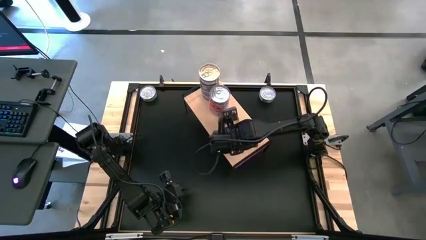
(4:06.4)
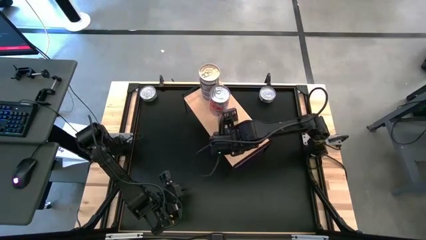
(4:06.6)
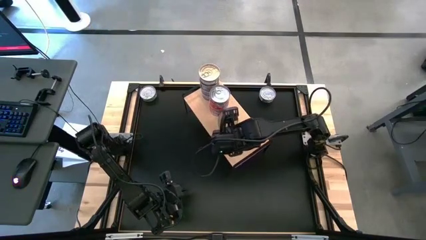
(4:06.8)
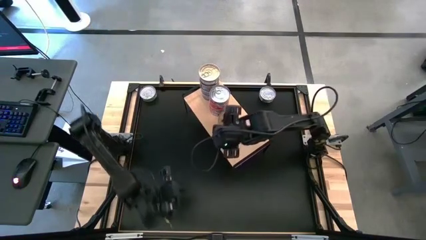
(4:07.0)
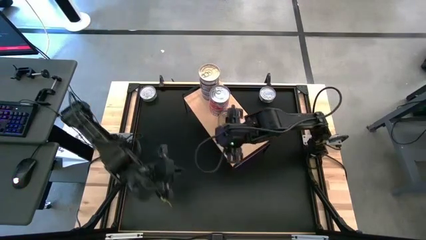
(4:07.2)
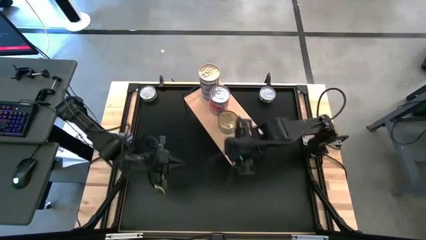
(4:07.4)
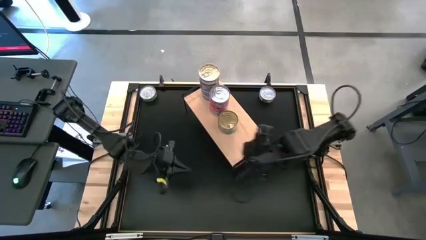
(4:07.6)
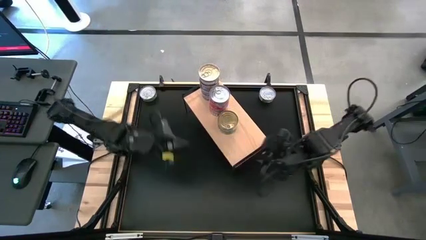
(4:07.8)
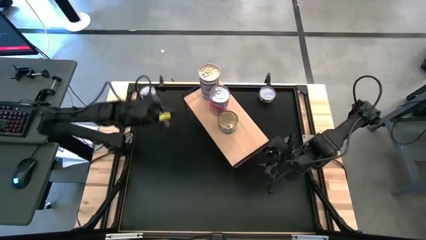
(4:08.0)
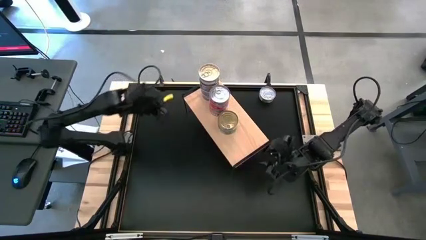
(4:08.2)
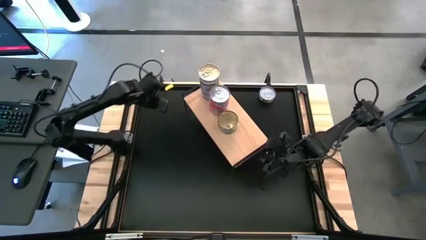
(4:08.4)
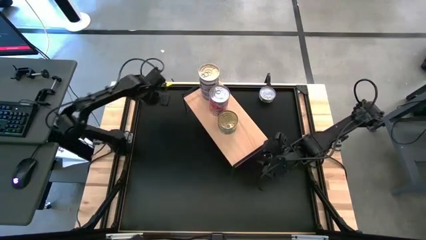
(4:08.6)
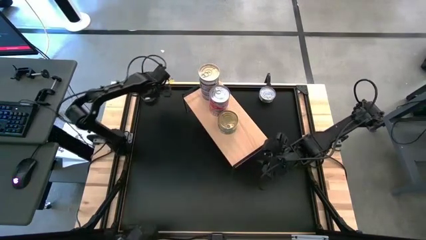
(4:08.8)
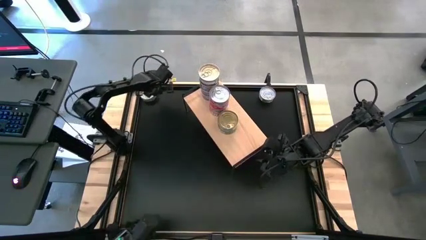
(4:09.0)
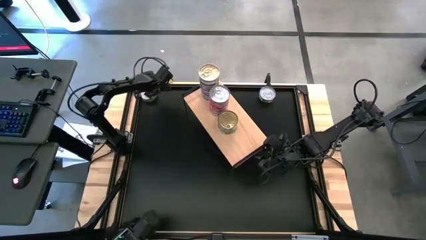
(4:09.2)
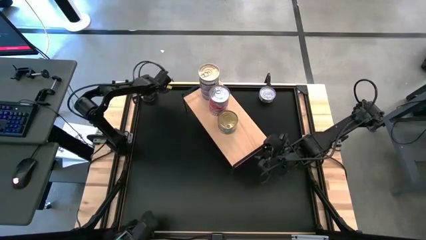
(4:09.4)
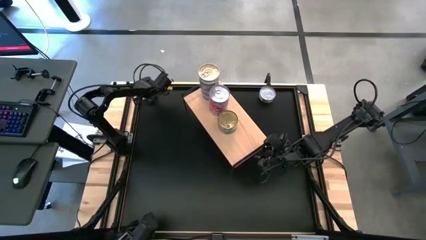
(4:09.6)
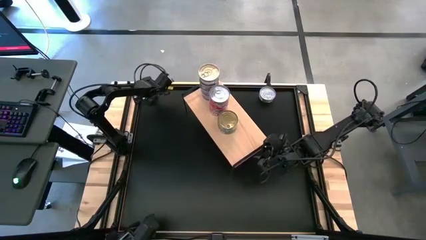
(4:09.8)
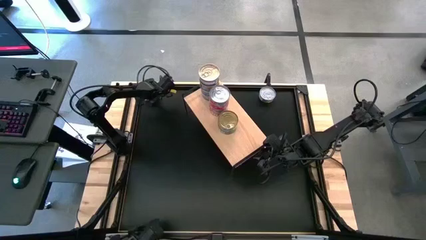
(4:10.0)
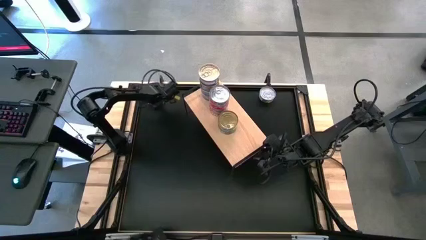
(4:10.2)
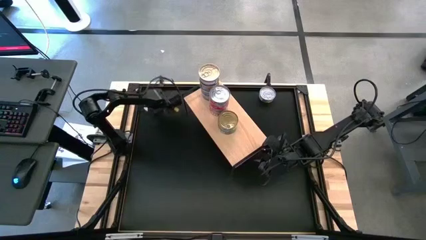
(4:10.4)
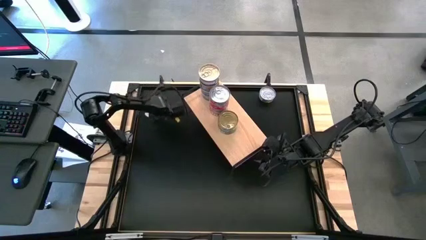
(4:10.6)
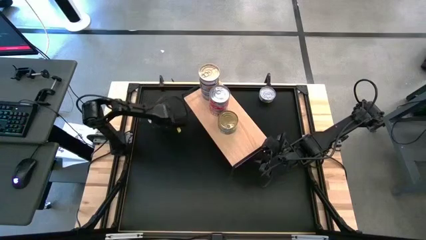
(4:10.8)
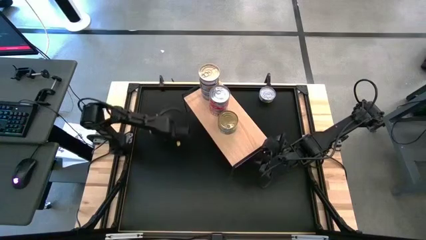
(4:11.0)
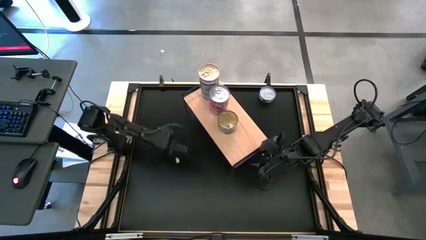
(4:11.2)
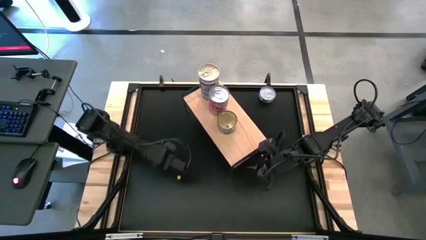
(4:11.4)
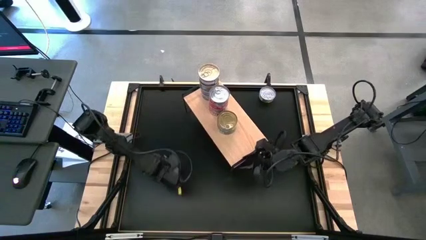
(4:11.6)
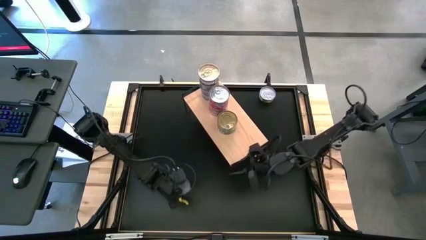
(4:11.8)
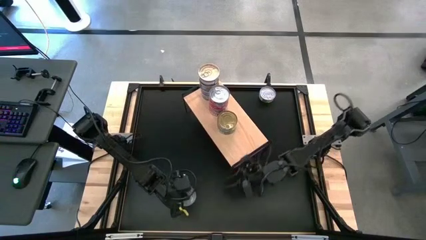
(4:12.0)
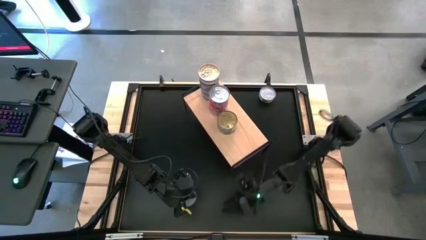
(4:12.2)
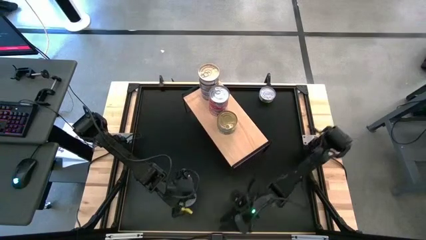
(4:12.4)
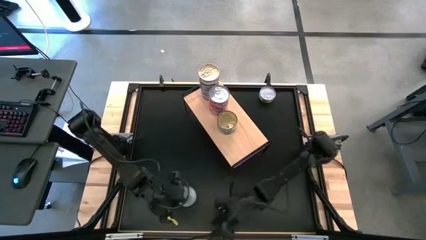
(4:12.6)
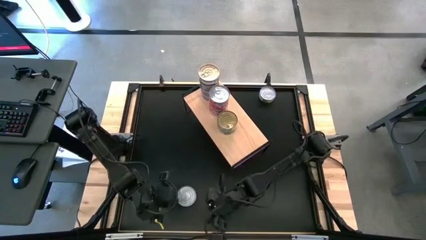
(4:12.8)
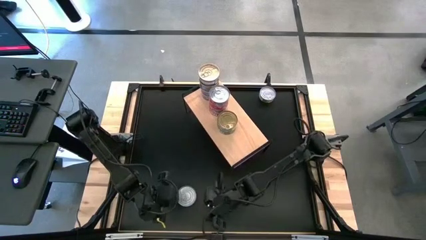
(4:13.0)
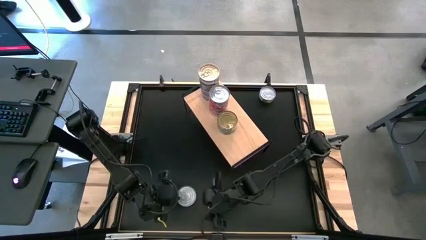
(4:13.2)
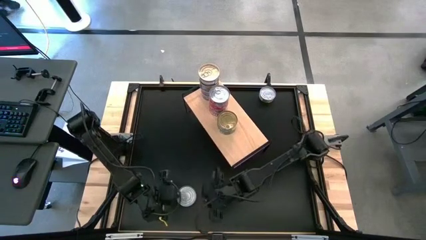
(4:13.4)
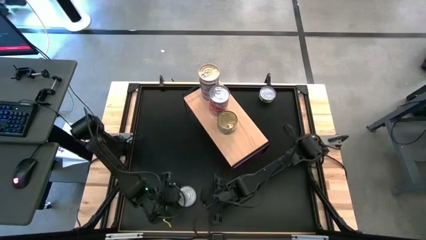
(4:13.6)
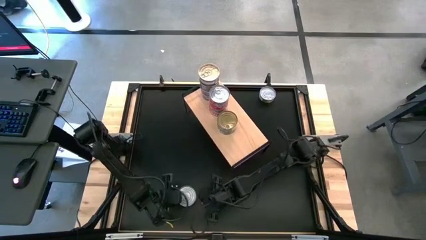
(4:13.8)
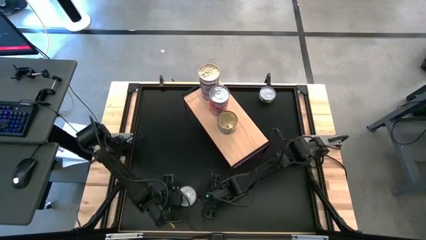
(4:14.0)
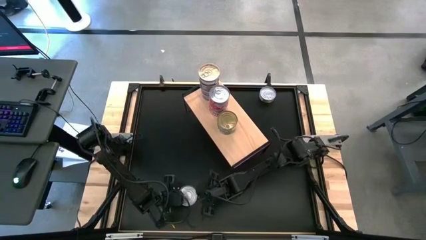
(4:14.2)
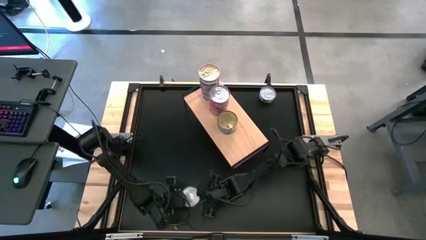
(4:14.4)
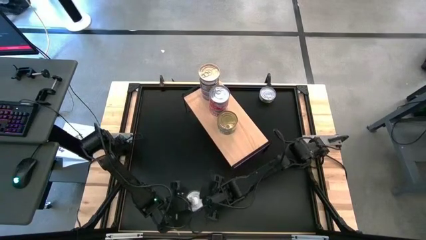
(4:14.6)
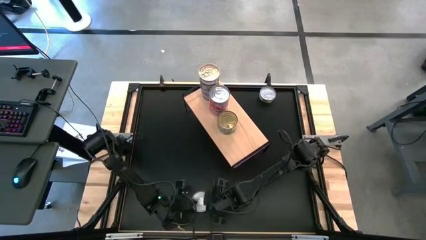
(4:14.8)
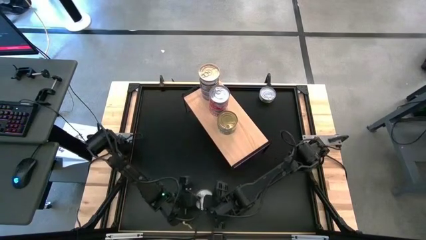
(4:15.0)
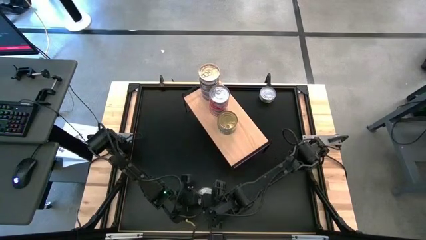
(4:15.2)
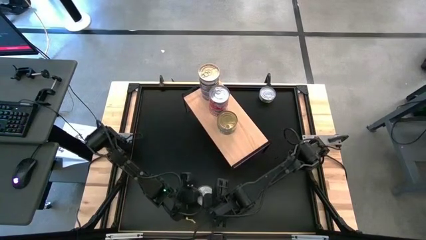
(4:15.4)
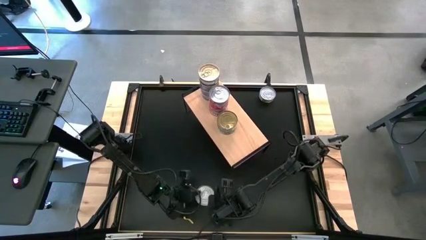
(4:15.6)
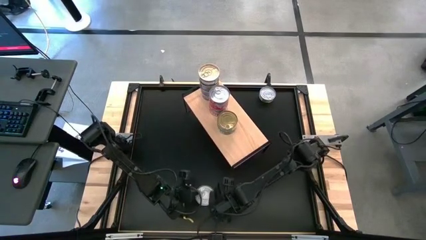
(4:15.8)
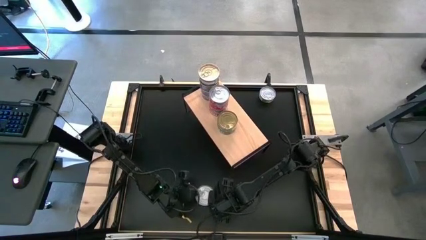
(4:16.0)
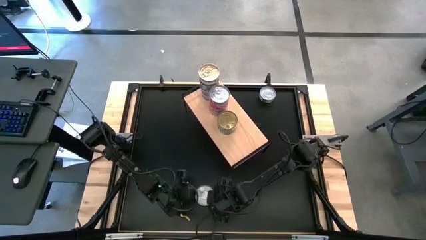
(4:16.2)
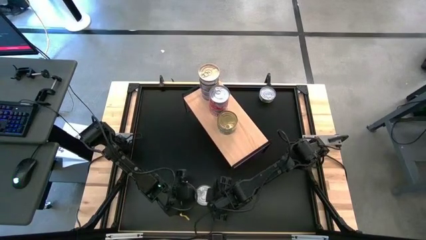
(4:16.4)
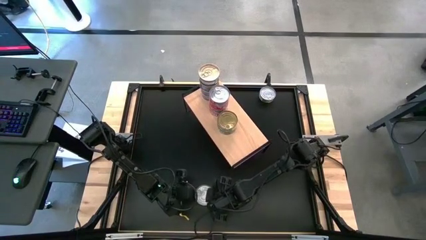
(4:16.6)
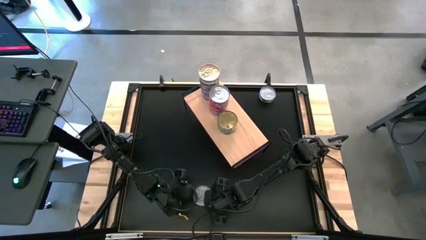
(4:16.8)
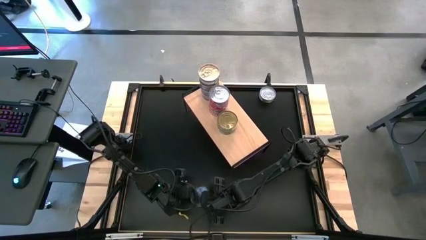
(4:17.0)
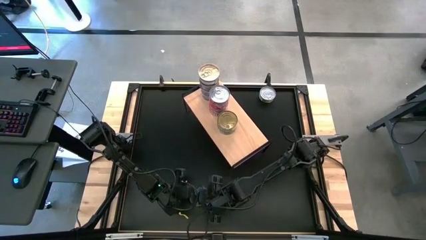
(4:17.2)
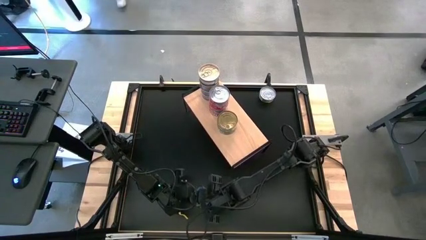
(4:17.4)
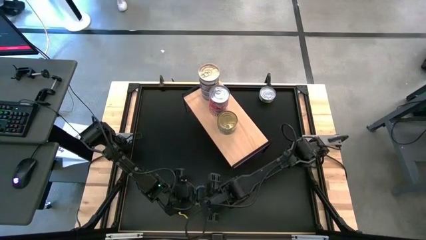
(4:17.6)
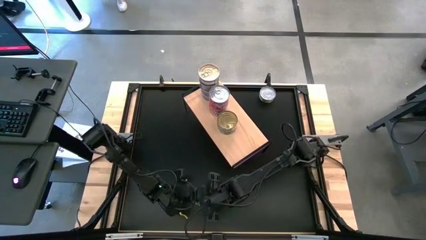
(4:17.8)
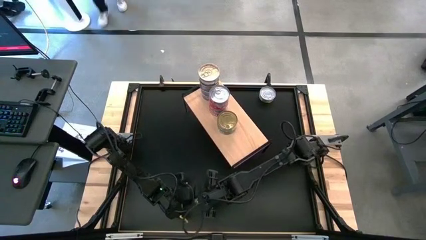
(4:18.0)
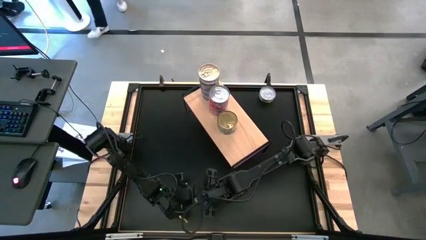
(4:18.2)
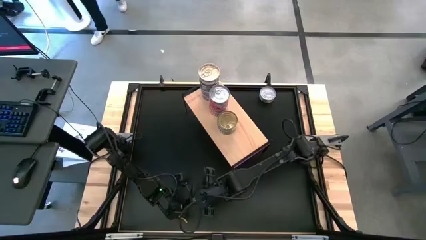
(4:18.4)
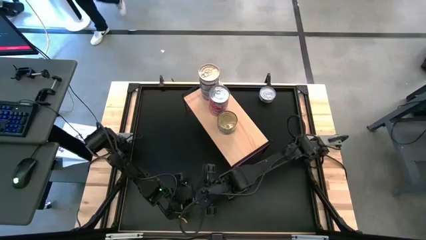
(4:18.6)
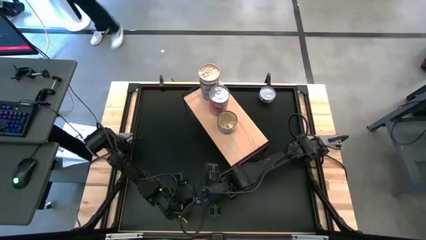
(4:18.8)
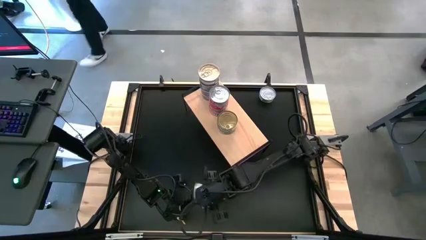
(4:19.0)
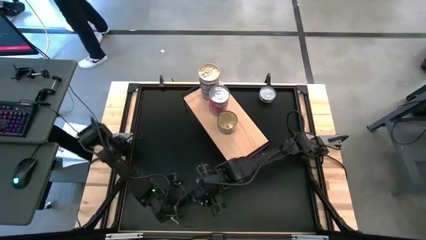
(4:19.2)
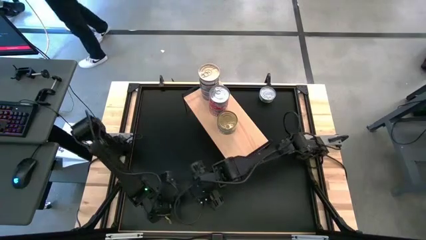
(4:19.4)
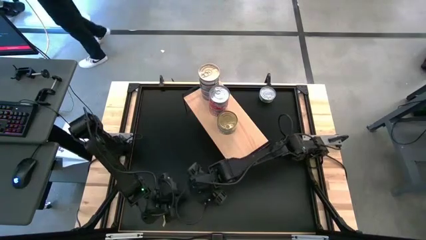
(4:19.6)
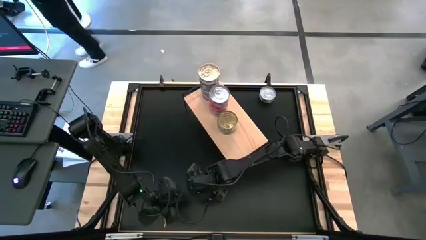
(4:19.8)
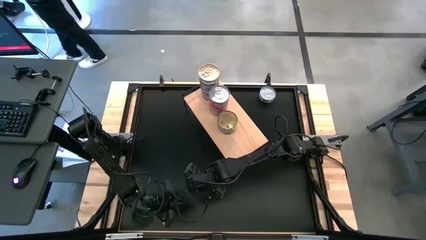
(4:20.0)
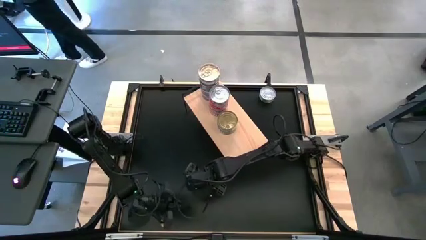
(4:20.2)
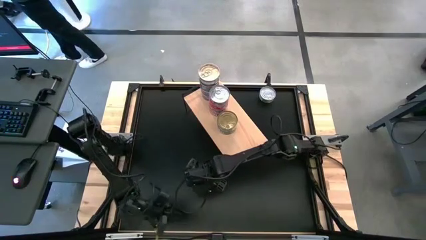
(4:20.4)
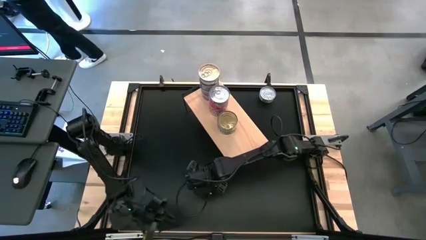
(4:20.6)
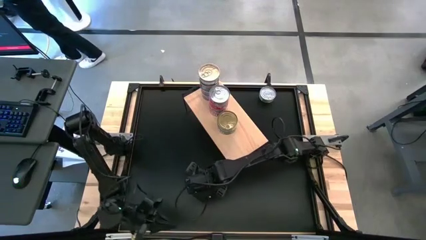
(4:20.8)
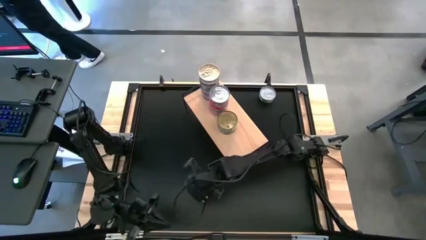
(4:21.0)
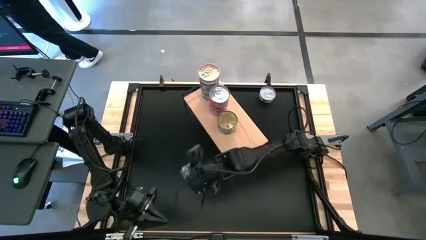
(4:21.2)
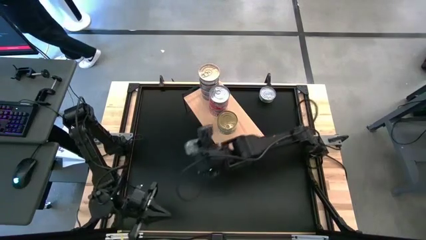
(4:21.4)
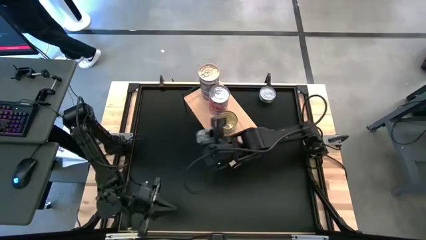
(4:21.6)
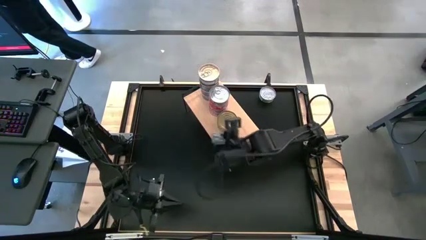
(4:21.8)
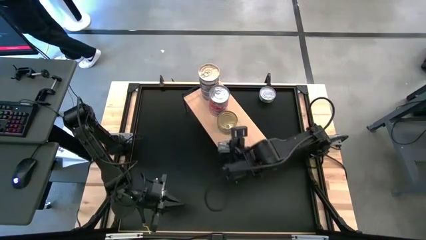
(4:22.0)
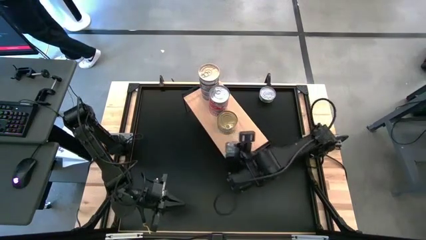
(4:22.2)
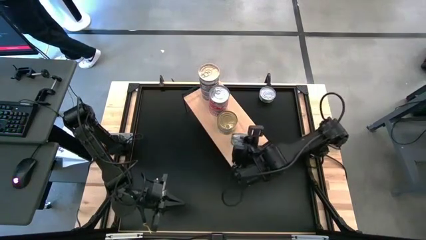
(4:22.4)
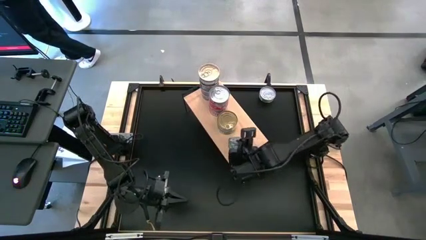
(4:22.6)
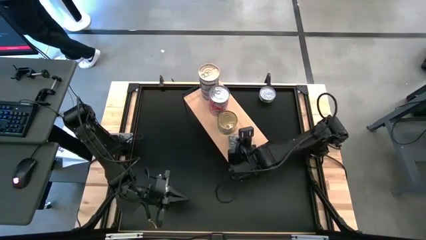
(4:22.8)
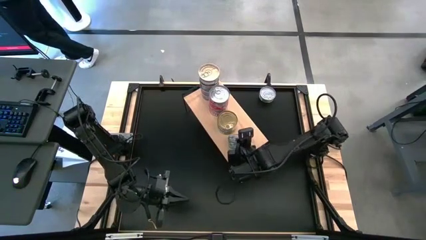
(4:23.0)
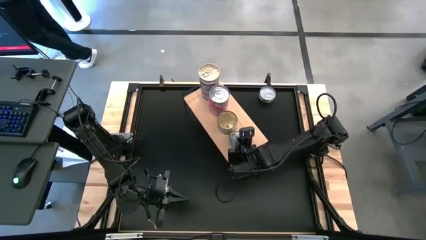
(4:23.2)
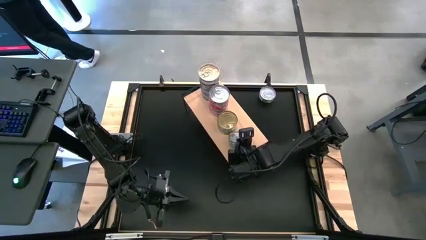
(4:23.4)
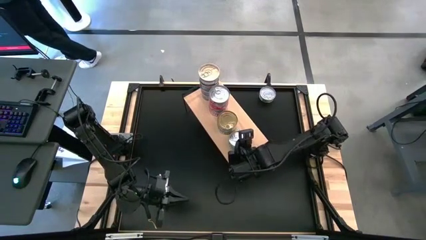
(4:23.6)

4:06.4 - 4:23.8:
Task: Stack canned seafood by type on shelf
Put the green tuna can on the shelf
